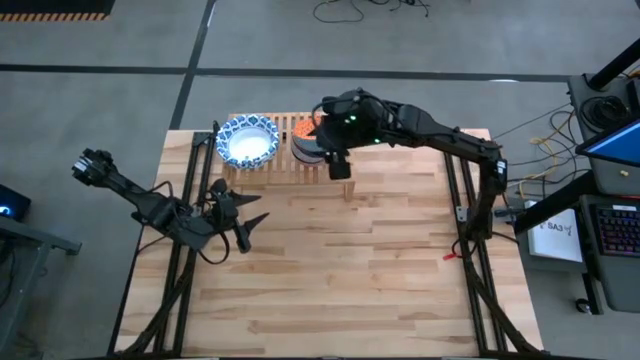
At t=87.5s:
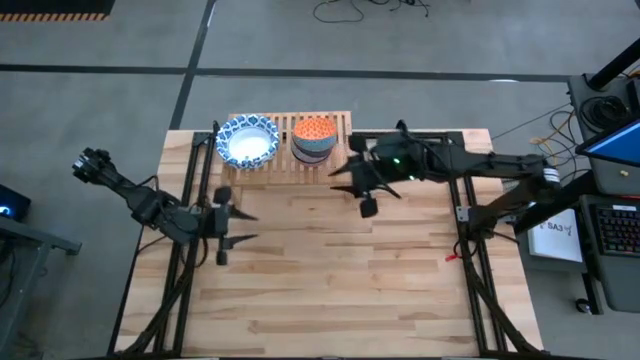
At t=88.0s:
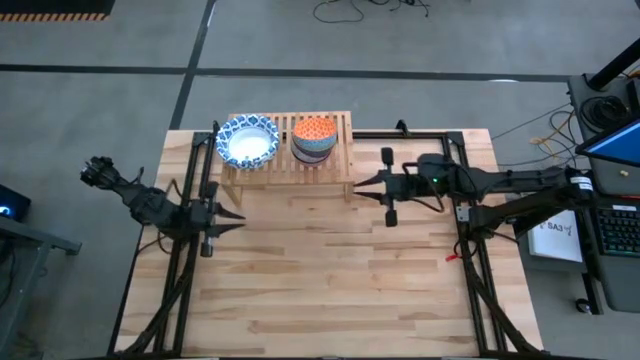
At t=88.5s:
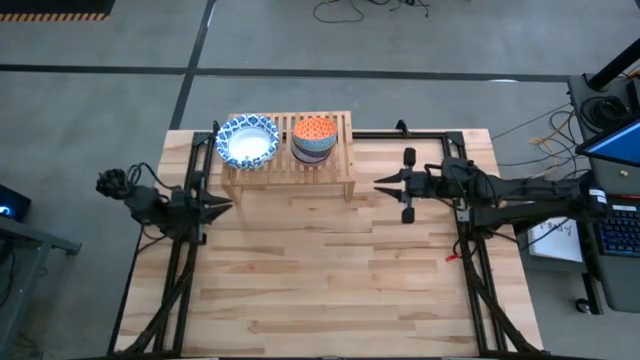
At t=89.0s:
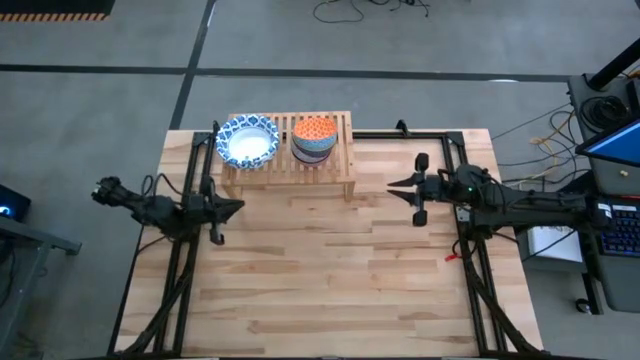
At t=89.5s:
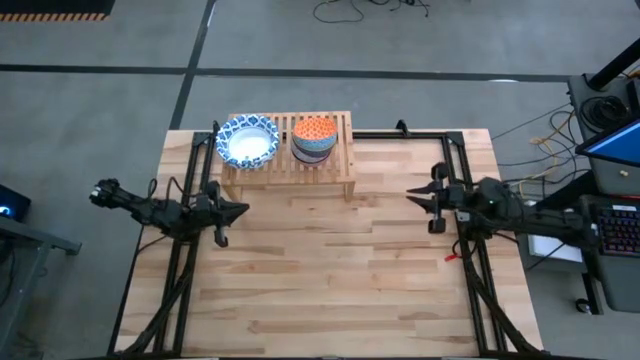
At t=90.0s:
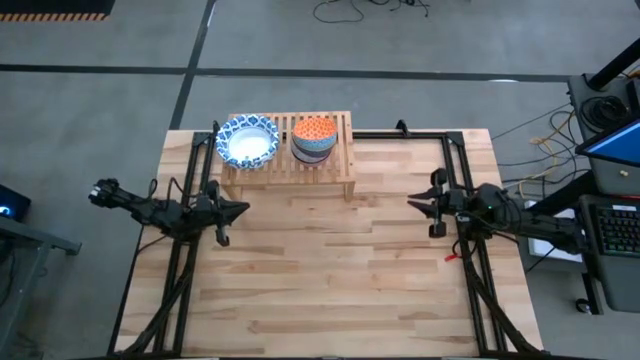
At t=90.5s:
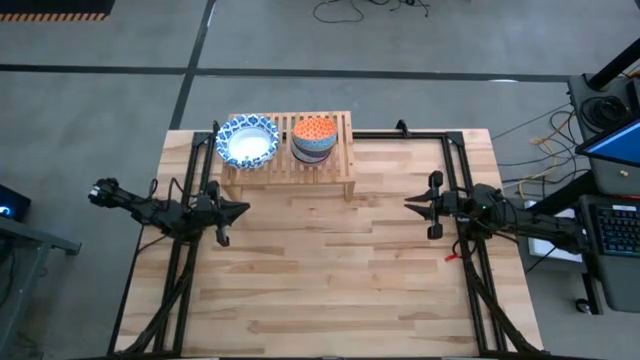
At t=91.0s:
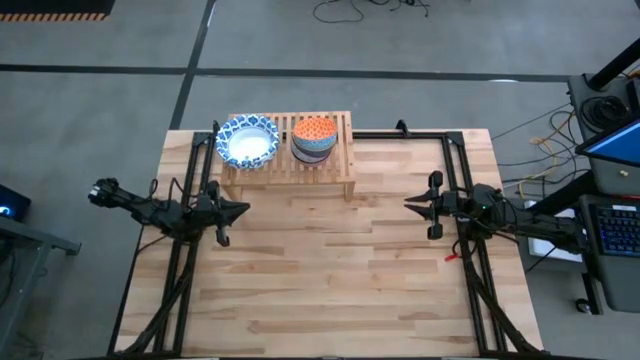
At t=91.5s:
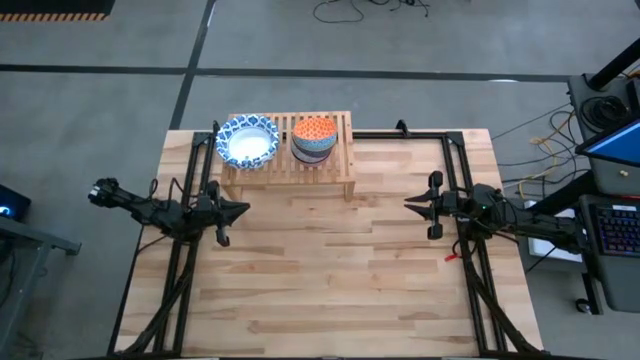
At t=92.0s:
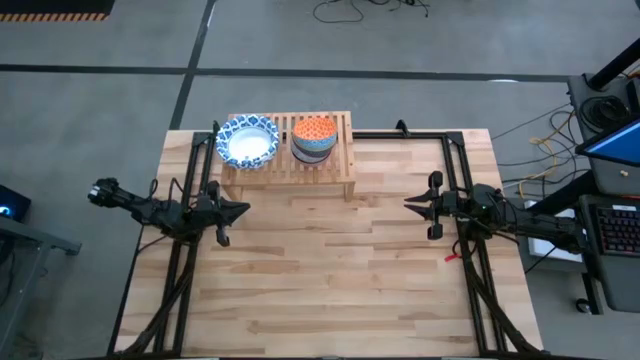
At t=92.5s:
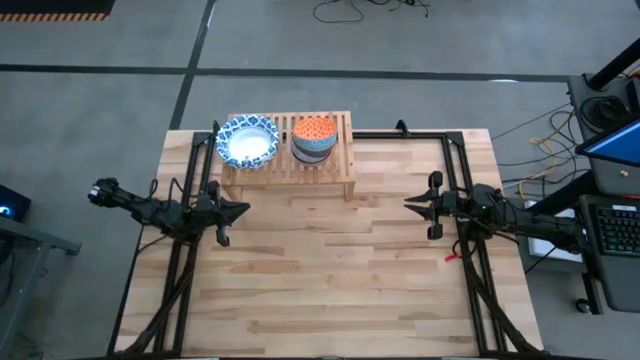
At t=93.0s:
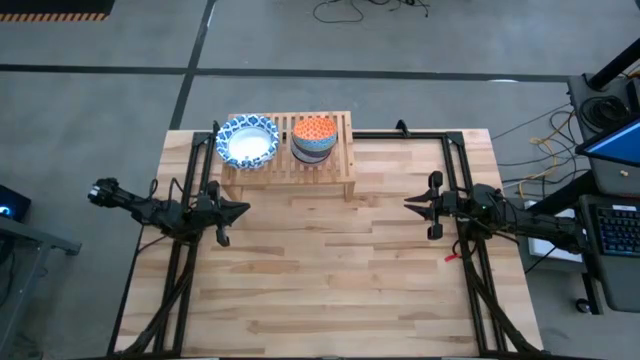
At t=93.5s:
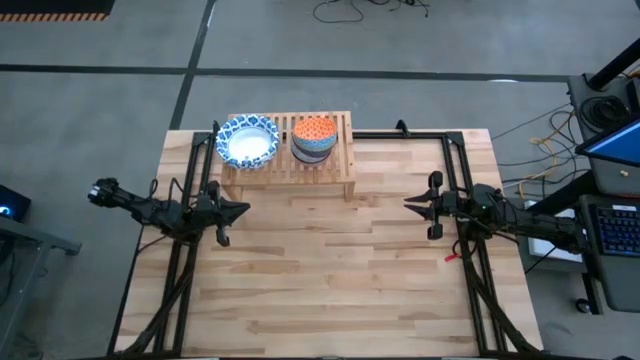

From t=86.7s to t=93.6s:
Task: Place and stack bowls onto a shelf
Return to home position

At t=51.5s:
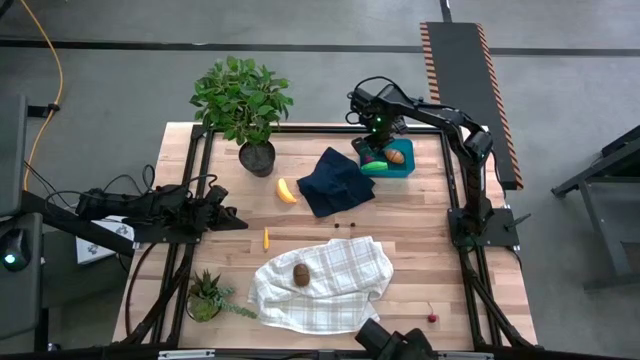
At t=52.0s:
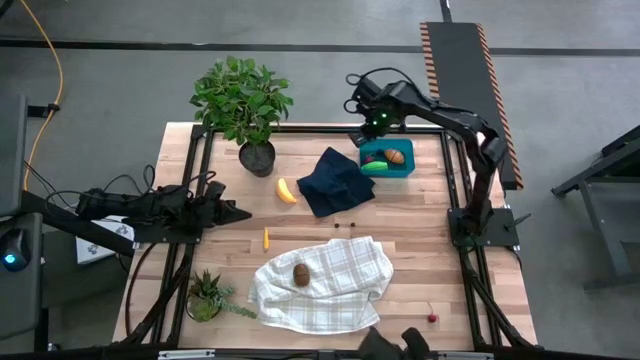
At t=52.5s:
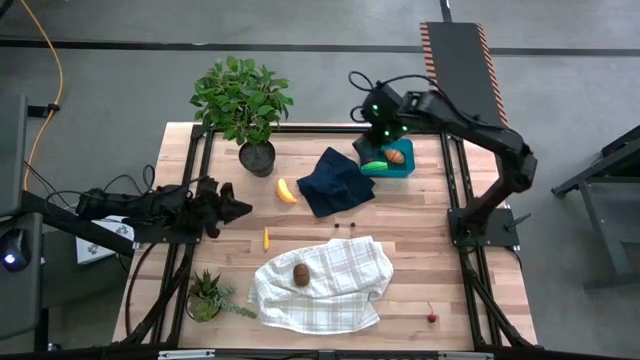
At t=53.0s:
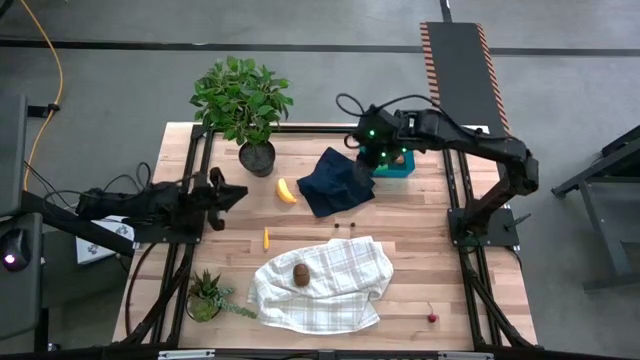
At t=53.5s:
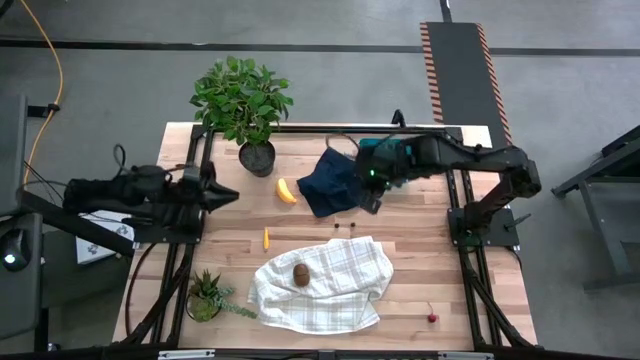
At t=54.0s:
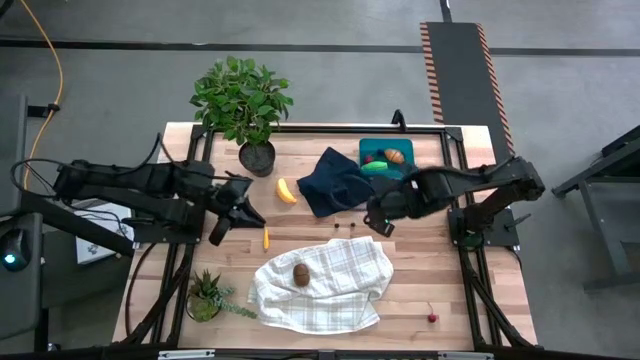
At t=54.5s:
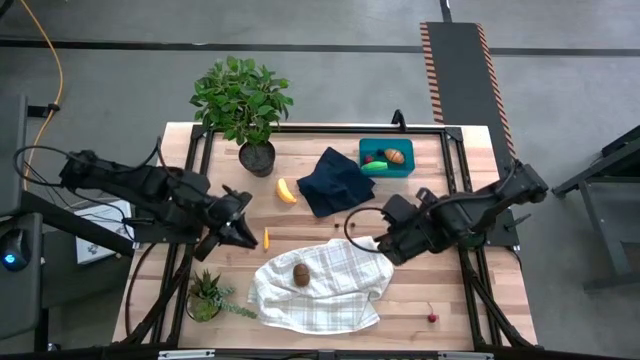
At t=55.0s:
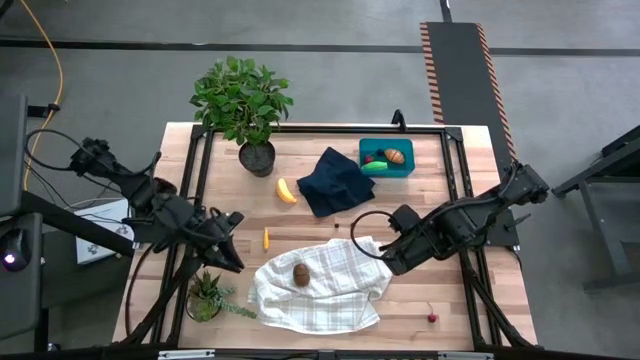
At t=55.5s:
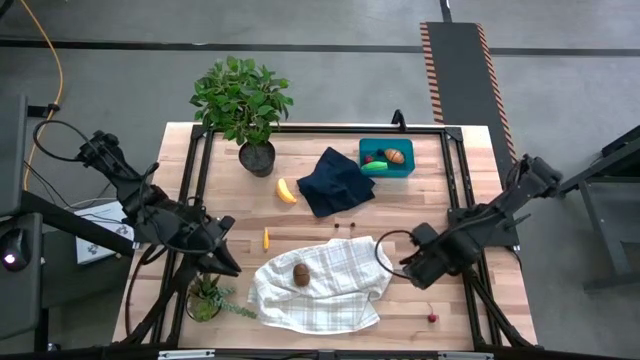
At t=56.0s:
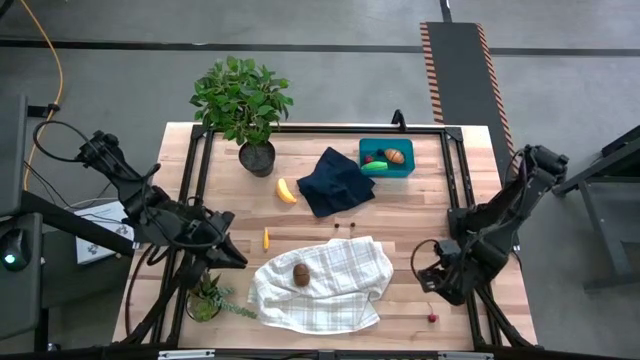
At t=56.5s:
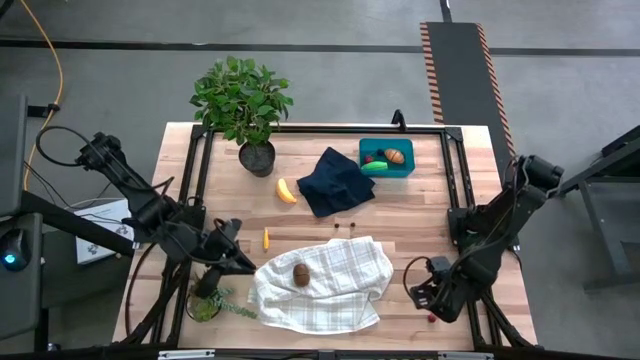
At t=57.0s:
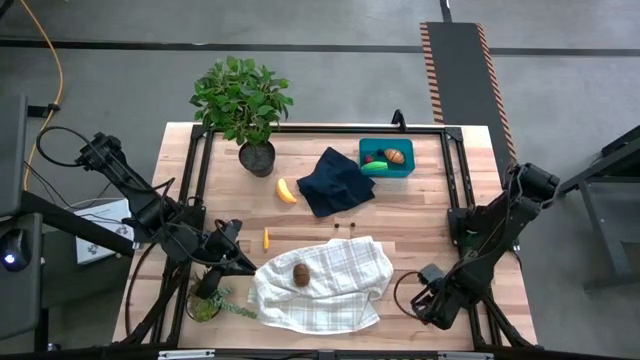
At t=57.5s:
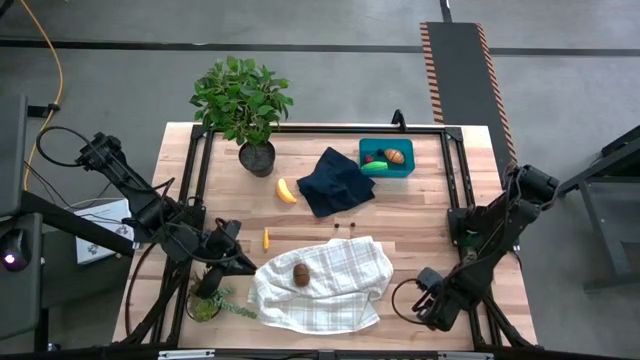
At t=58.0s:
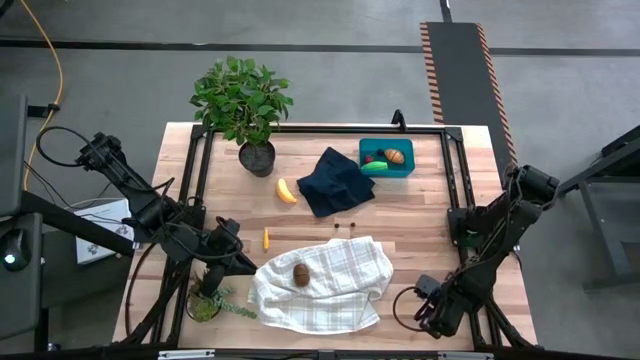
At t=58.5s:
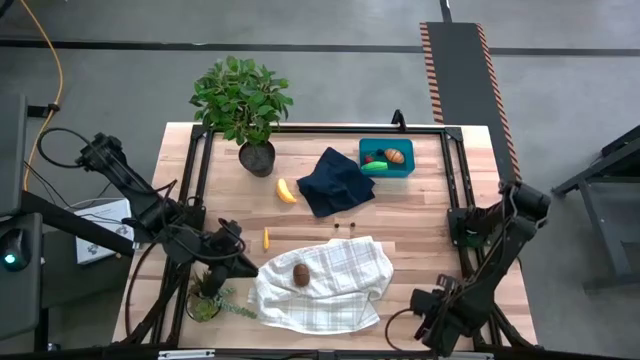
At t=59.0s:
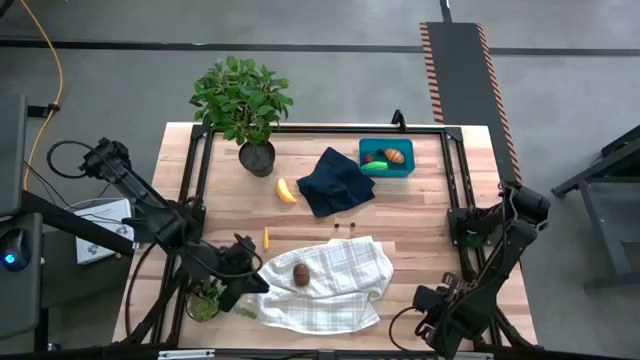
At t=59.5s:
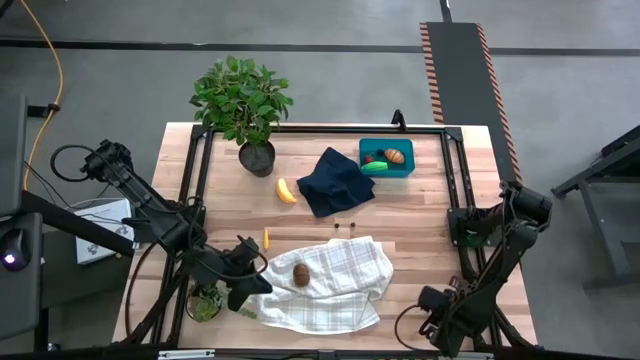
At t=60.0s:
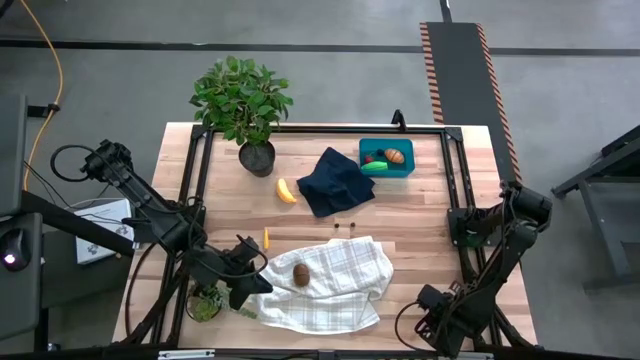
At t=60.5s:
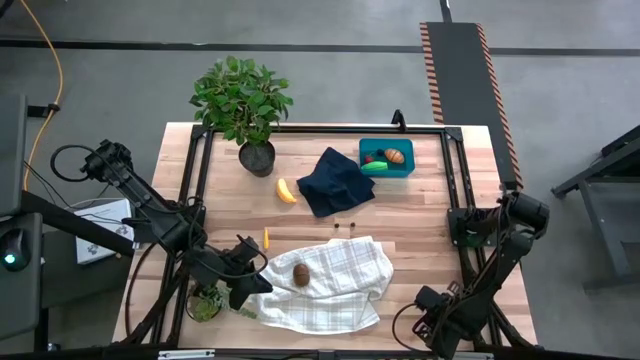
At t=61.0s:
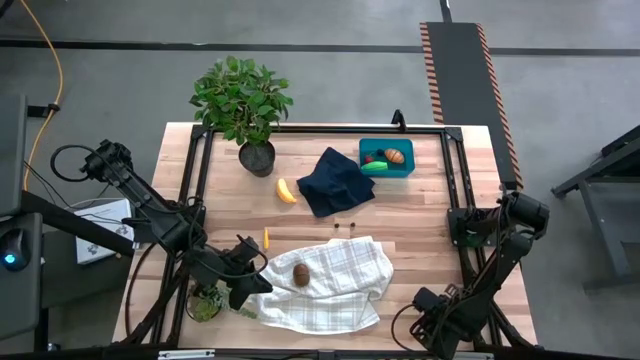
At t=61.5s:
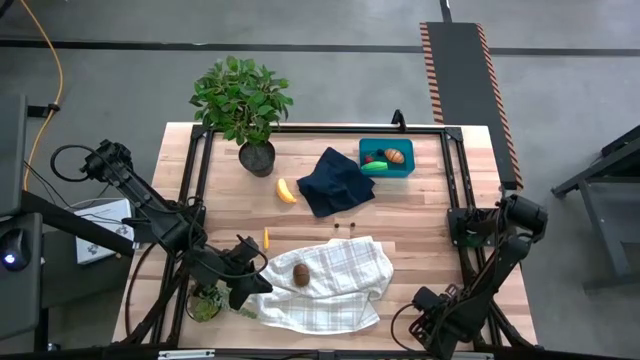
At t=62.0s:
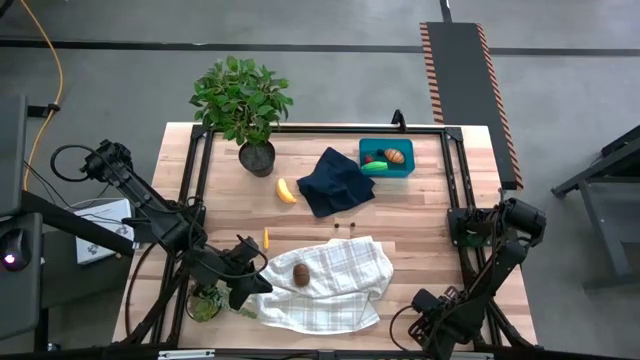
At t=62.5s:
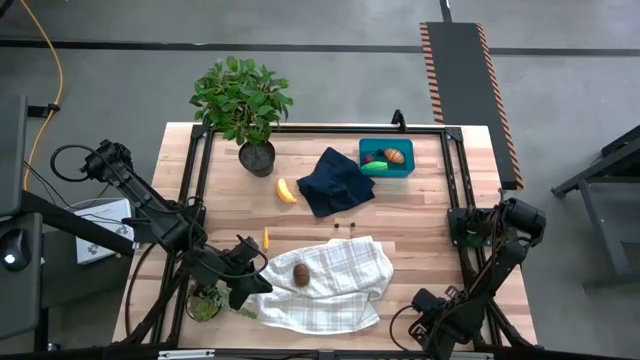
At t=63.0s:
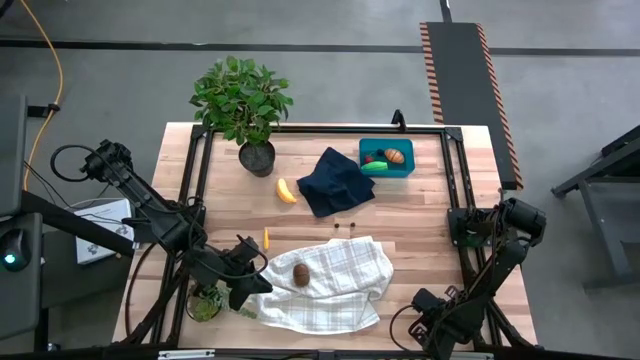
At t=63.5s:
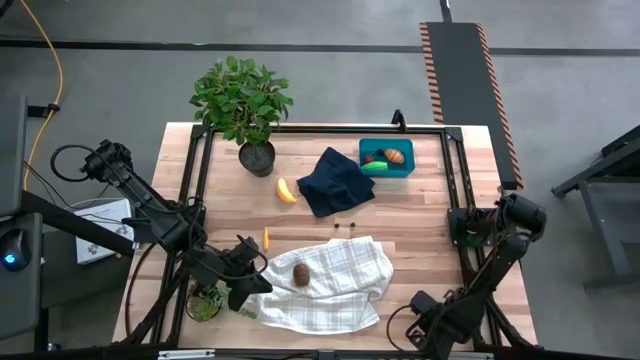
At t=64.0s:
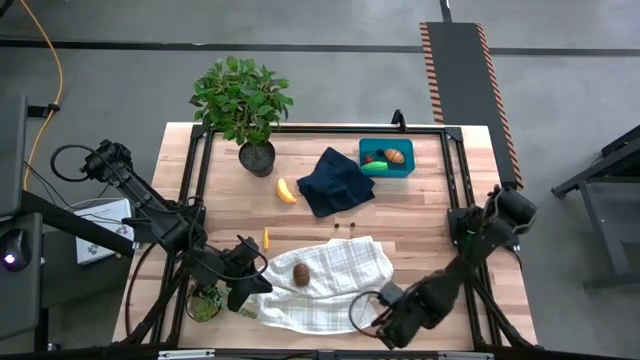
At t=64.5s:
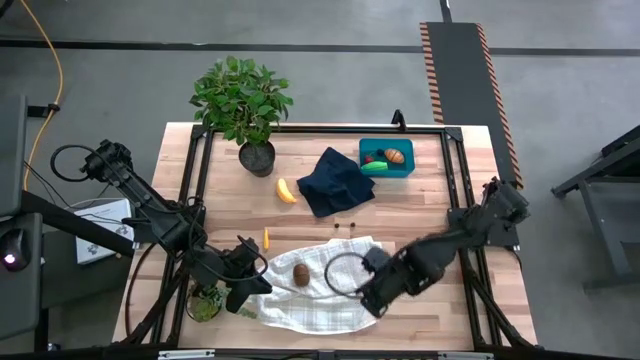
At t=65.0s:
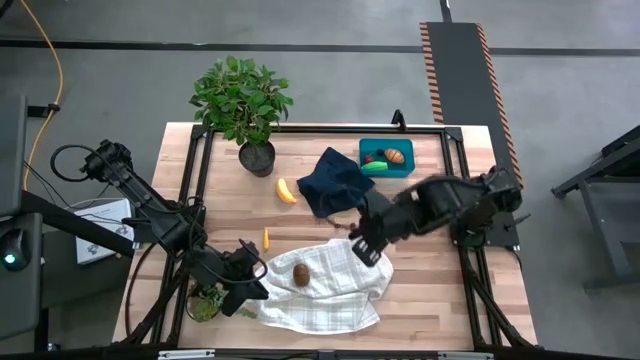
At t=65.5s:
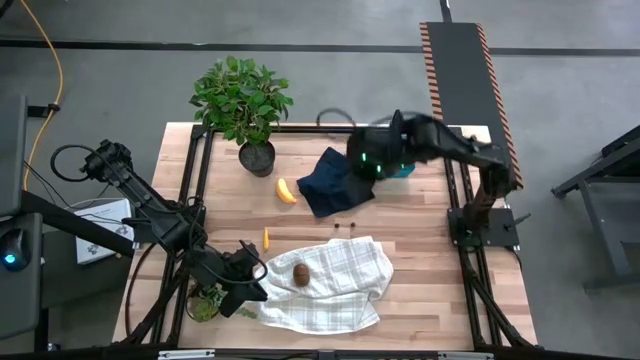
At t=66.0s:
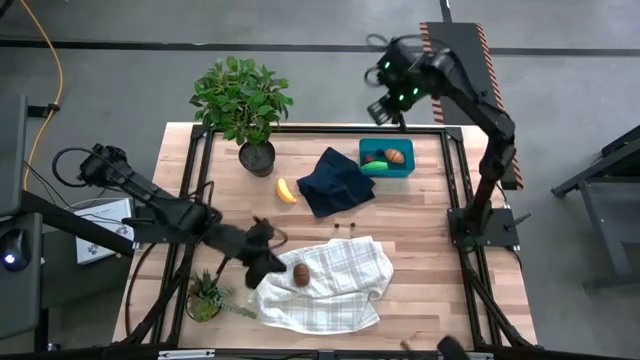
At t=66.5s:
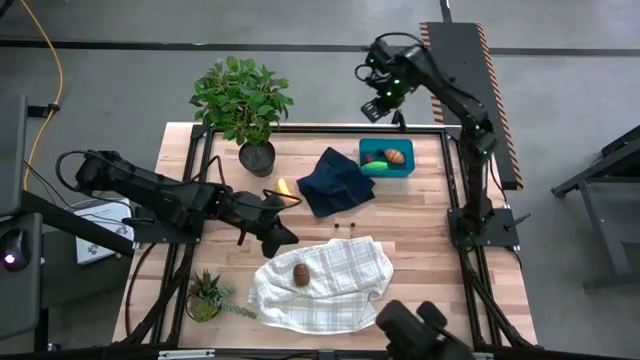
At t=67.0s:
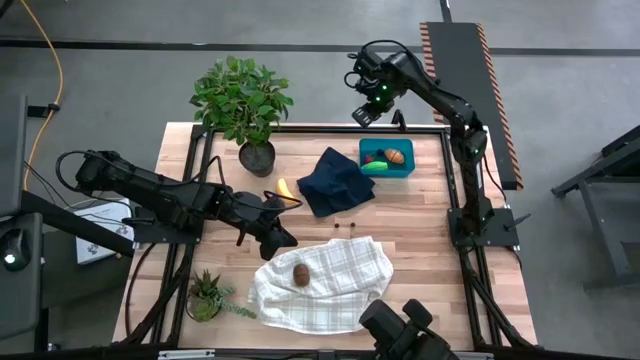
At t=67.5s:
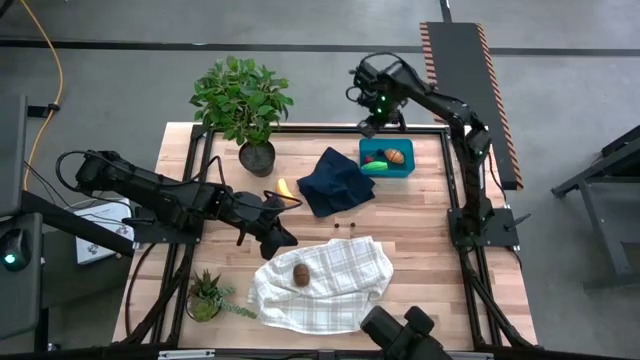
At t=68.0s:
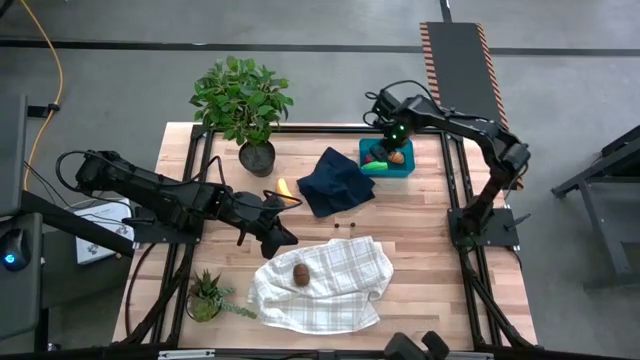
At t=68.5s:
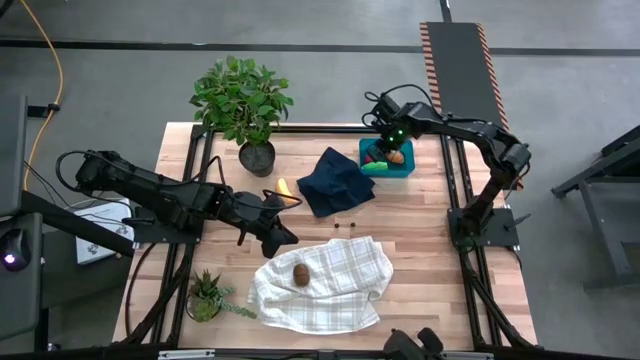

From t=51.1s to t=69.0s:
Task: Pick and placing Produce into tupperware
Put the red cherry into the blue bin
